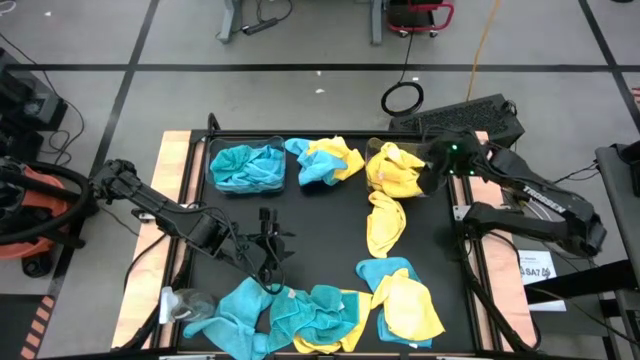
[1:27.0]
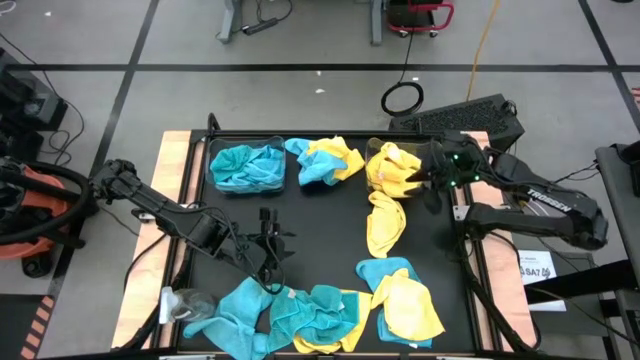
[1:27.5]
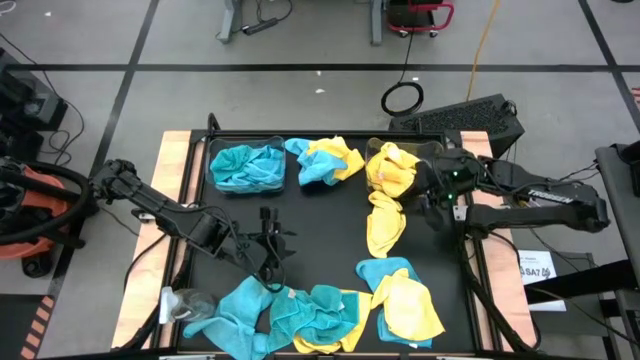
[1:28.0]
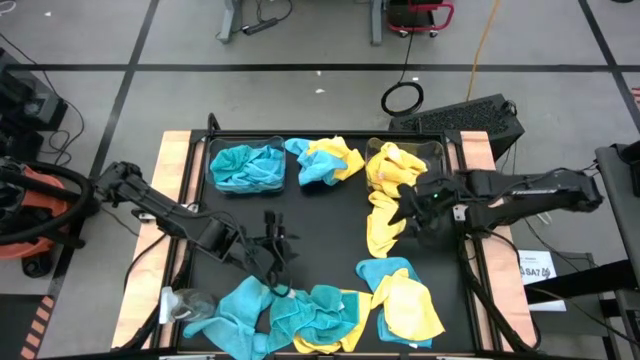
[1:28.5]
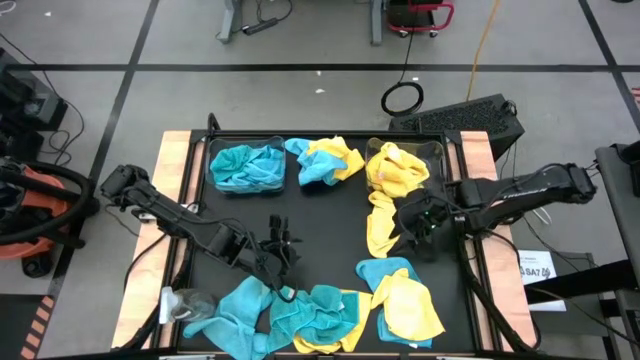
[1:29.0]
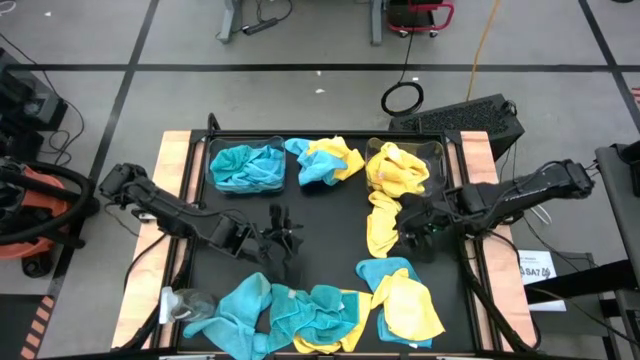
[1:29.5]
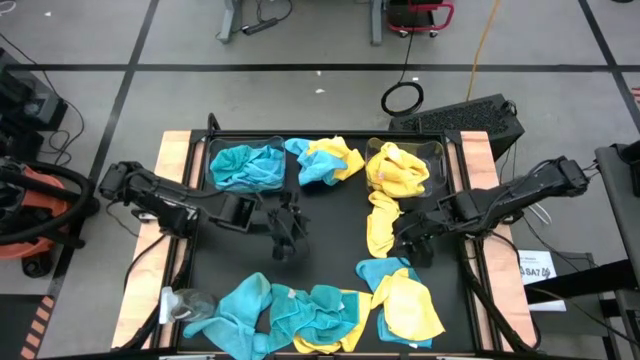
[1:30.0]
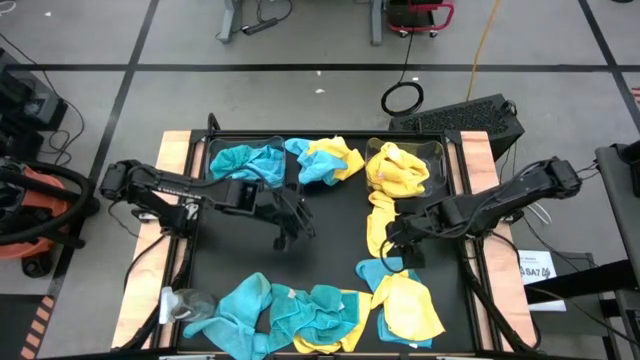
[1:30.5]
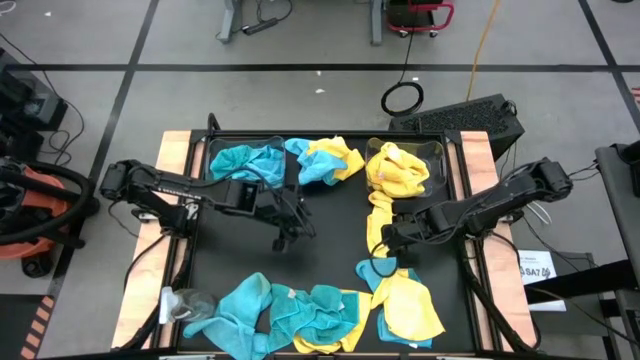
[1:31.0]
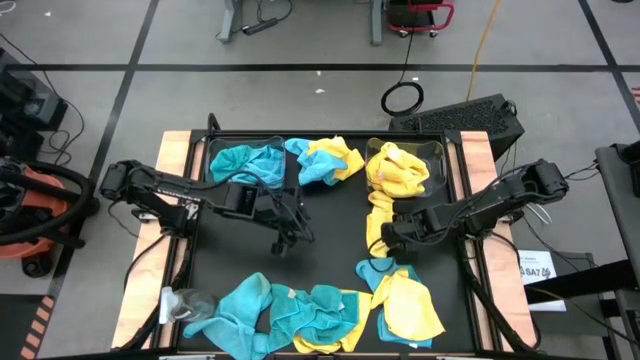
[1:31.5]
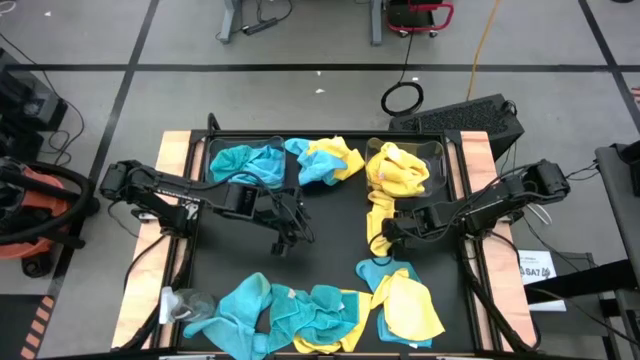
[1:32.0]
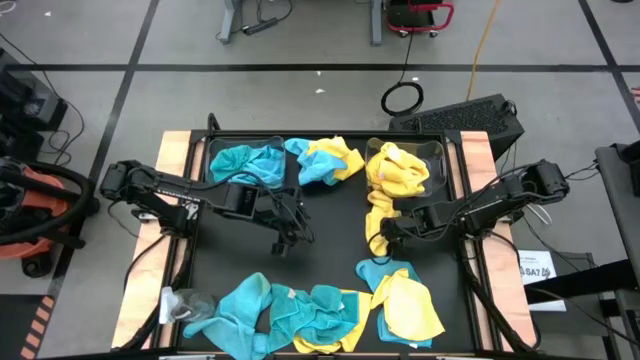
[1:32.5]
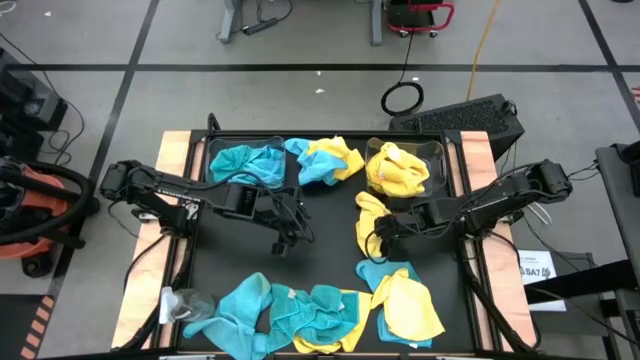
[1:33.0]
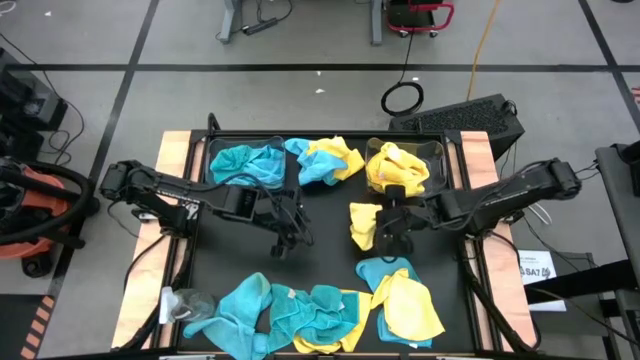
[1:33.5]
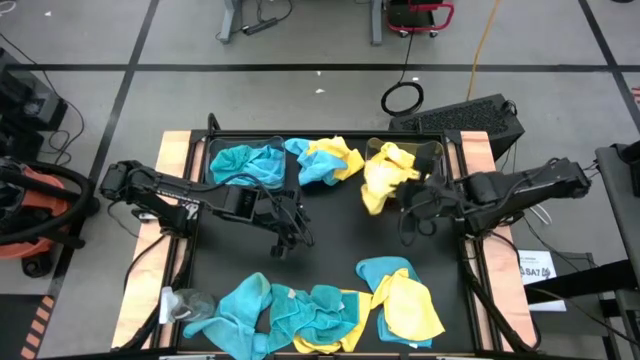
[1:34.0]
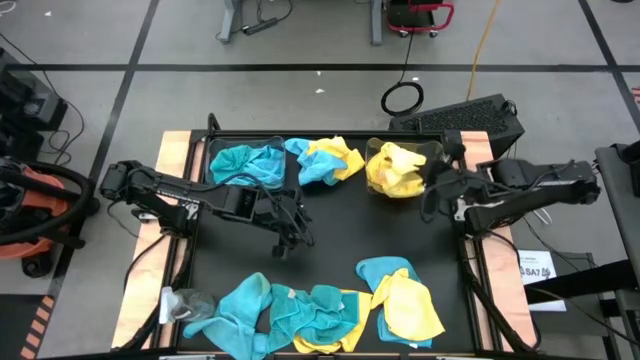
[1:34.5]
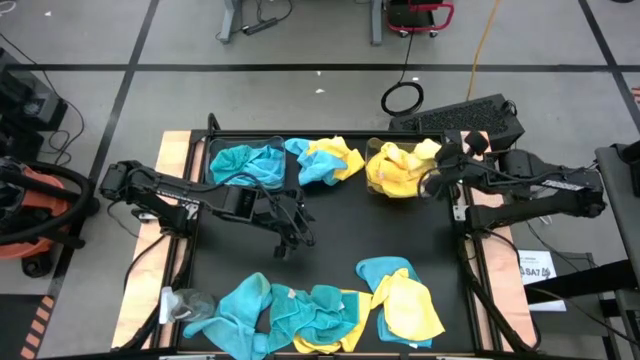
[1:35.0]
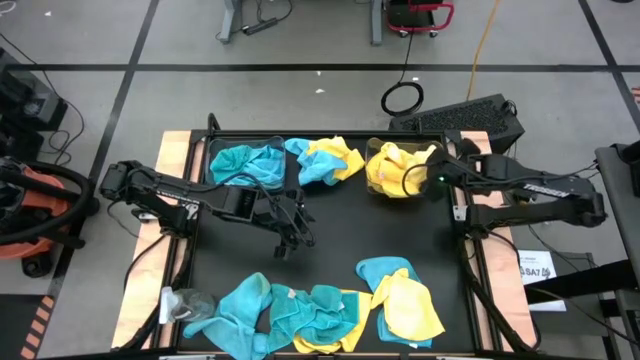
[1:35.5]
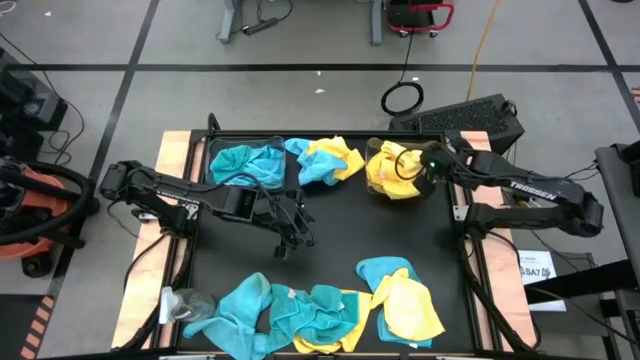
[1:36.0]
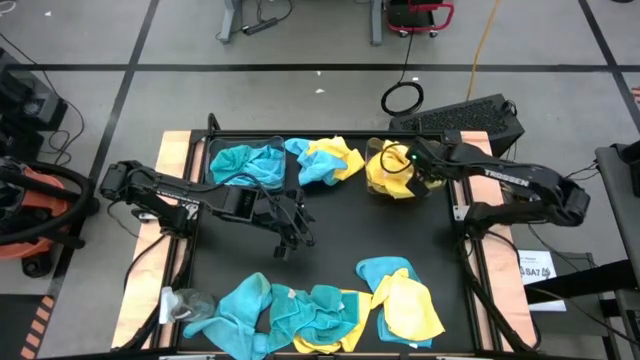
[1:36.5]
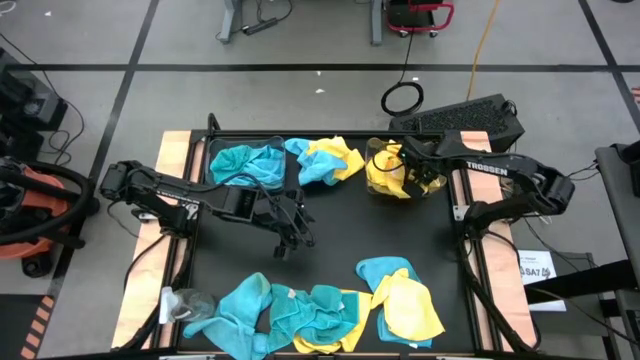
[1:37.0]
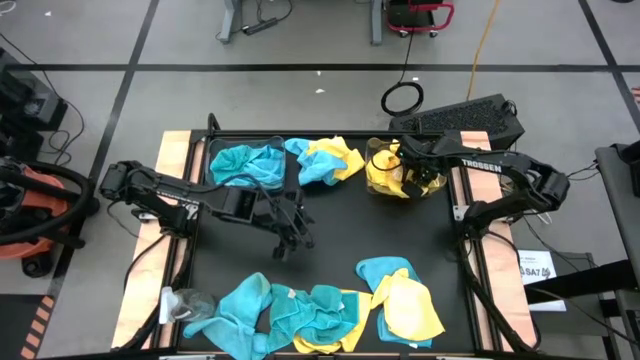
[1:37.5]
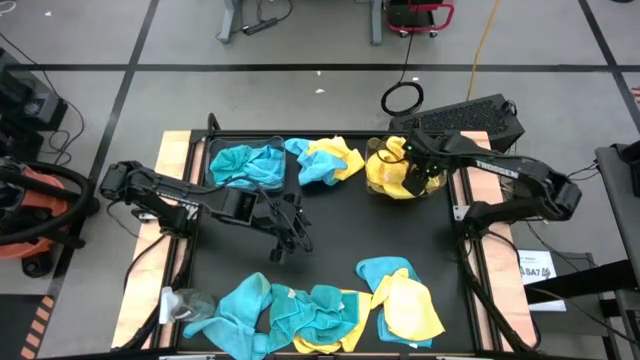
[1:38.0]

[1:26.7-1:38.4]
Task: Sort microfiber towel by color & place in baskets
Put the right yellow microfiber cloth into the right transparent bin

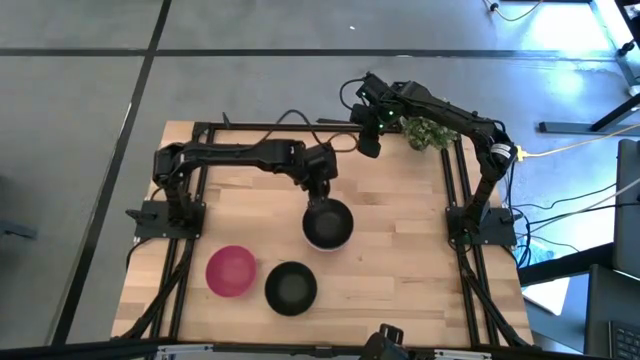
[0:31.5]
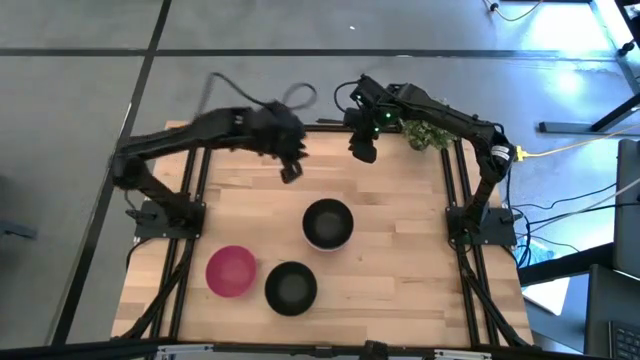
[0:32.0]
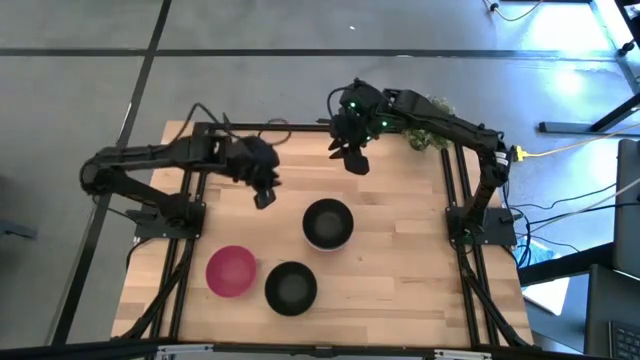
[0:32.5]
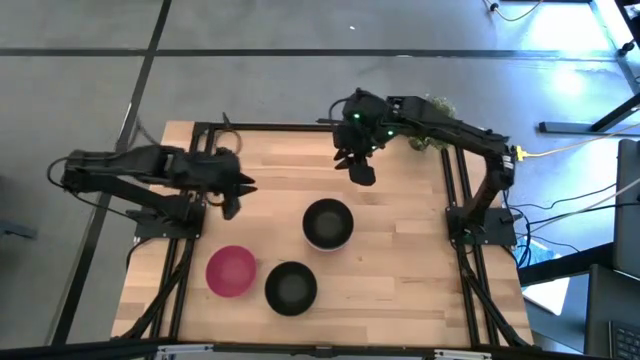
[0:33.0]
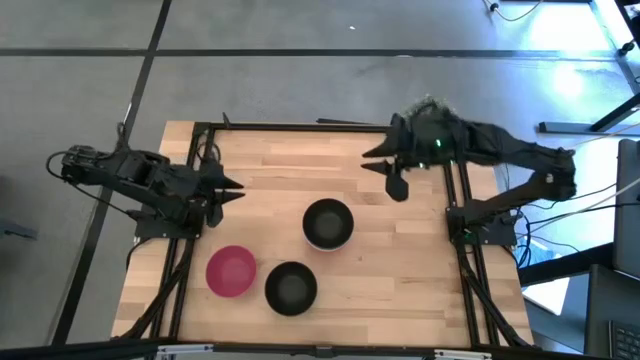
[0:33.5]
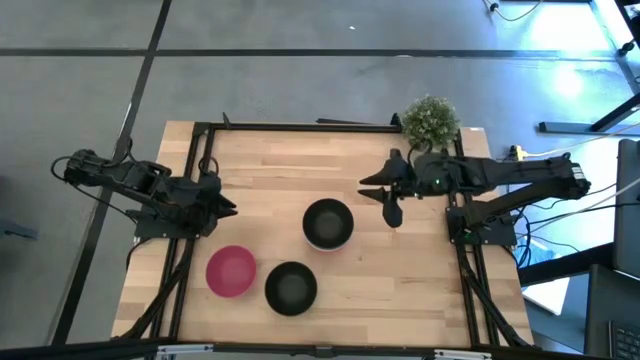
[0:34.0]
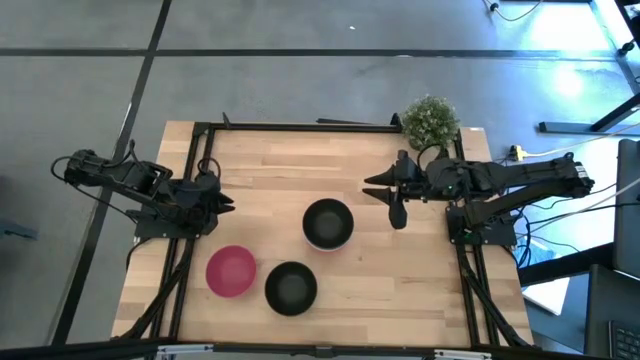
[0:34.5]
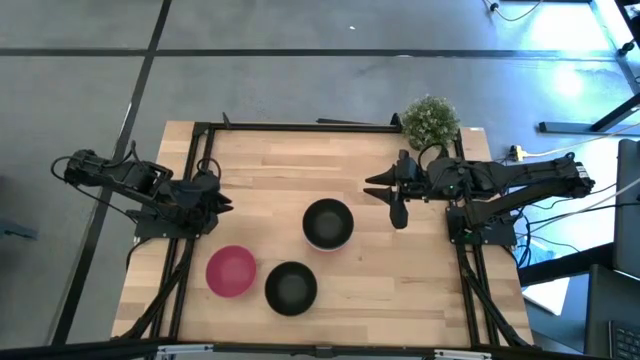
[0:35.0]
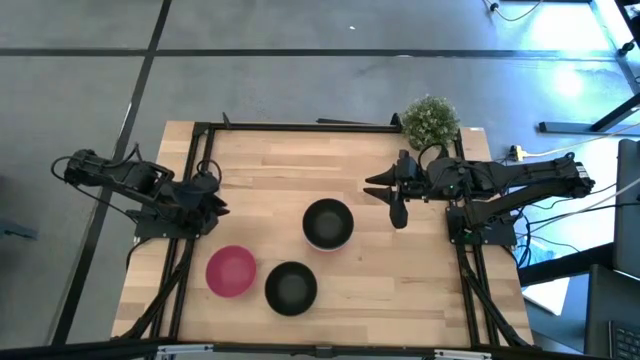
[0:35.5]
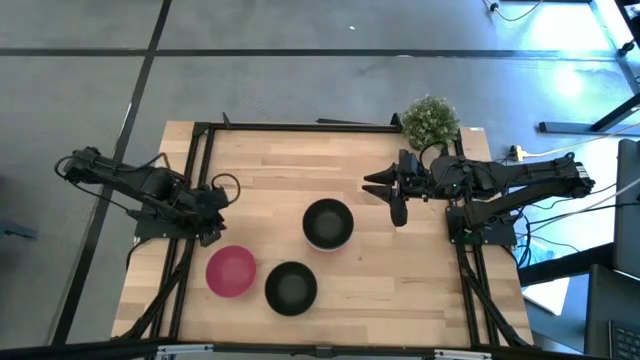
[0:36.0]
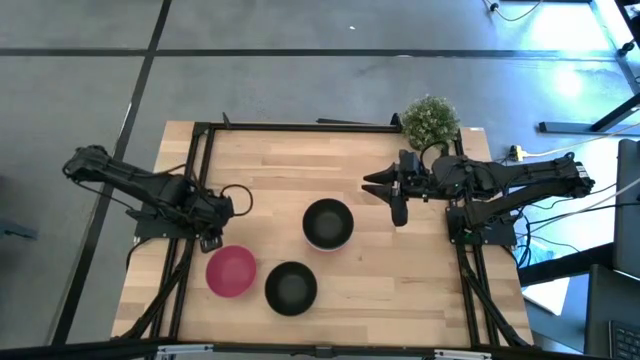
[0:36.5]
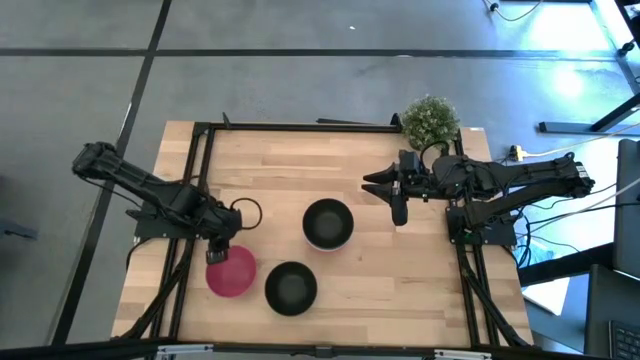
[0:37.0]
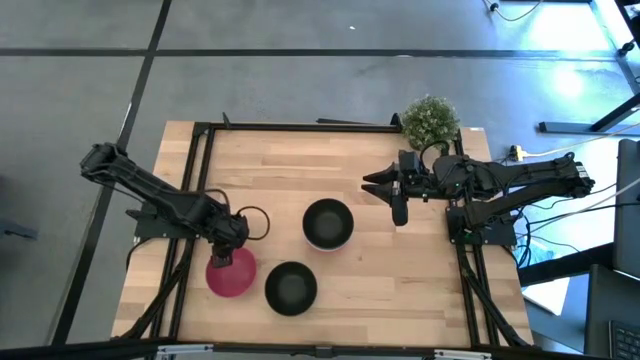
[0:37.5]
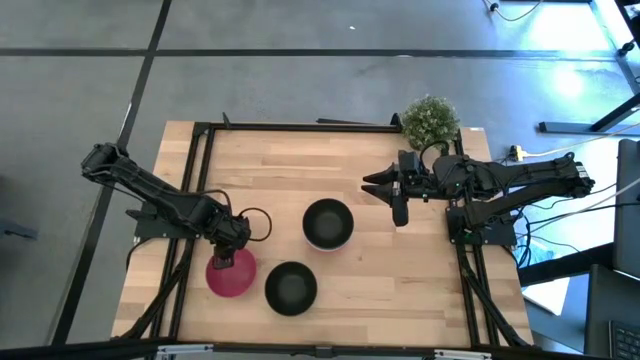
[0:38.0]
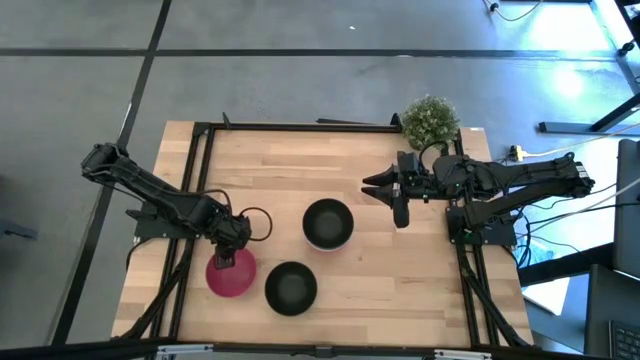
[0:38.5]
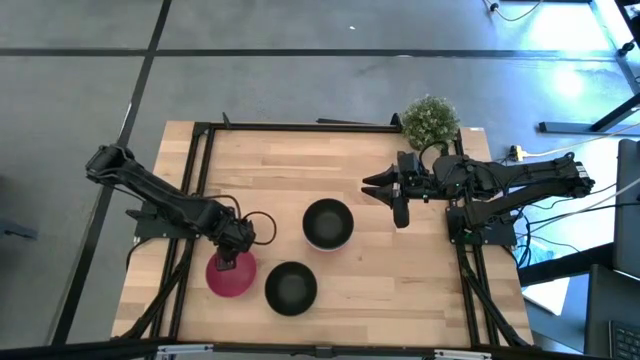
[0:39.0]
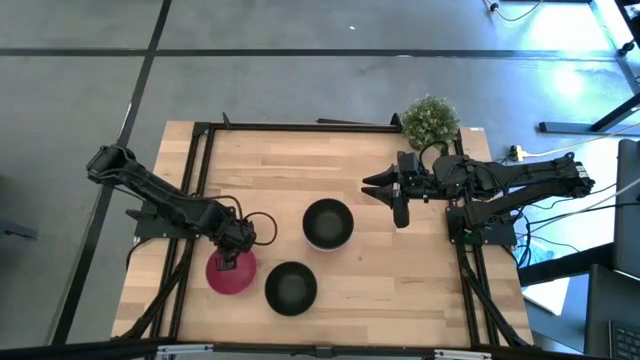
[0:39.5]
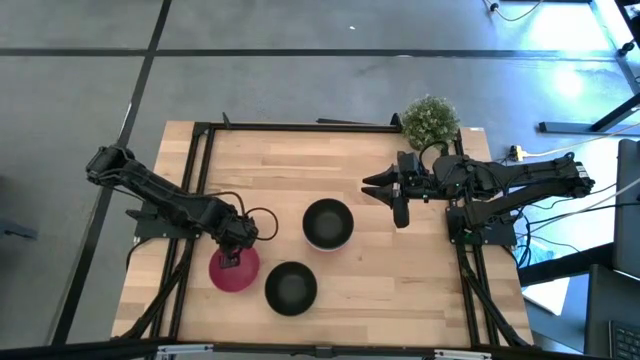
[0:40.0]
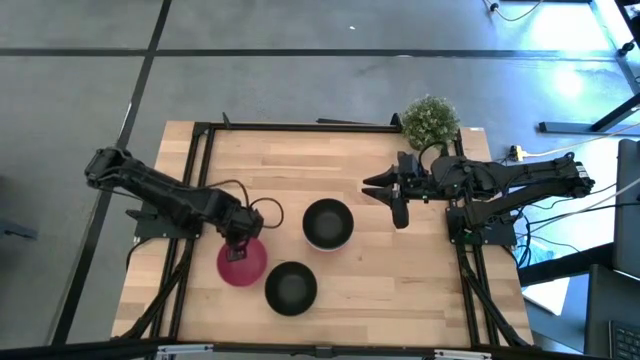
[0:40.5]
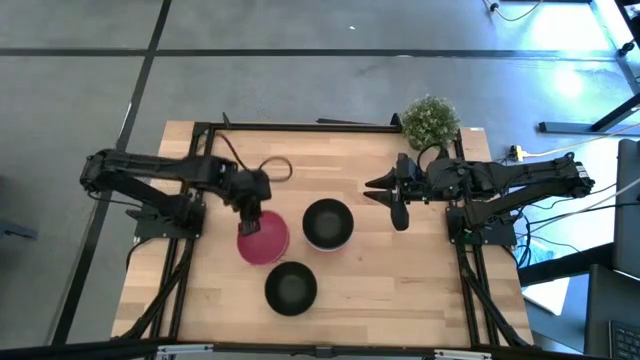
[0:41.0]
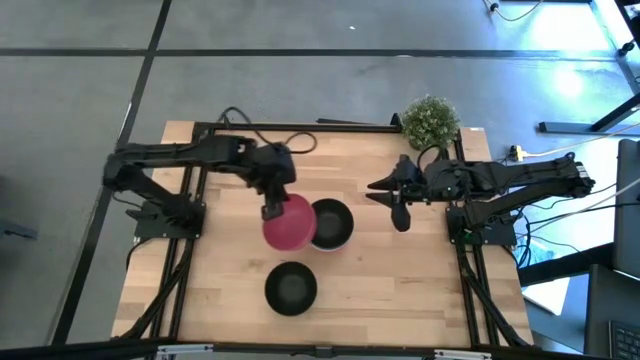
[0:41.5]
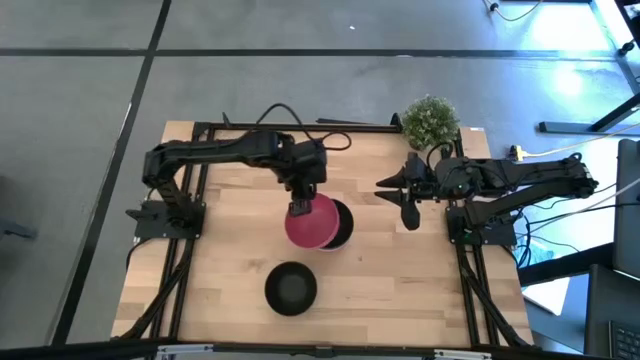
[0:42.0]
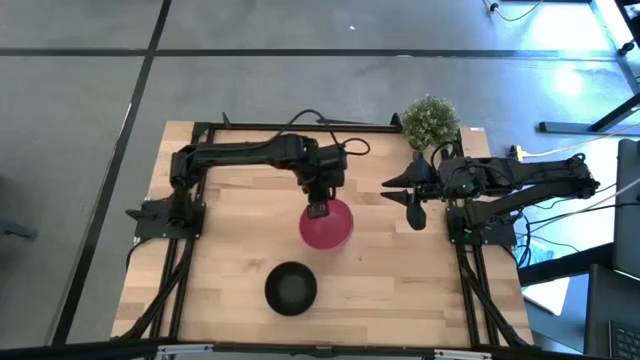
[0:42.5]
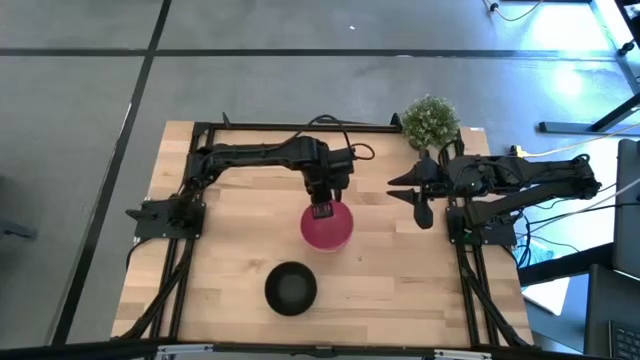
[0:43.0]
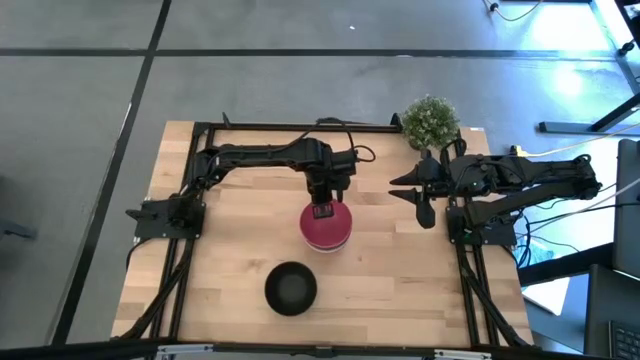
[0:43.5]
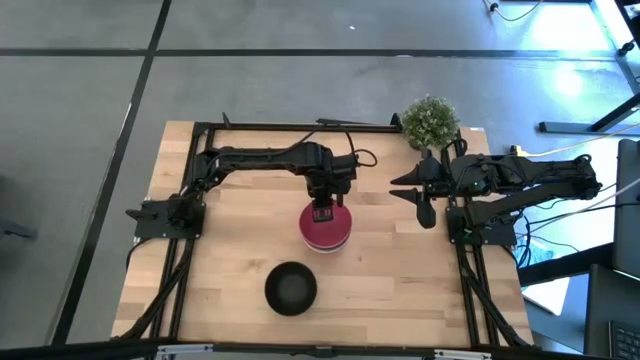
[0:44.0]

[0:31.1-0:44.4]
Task: Nest bowls inside each other
Stack the pink bowl on top of the black bowl
